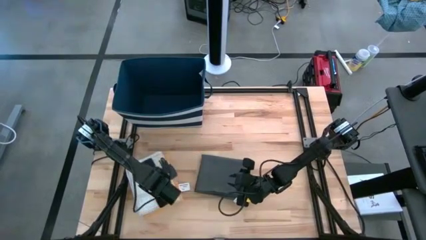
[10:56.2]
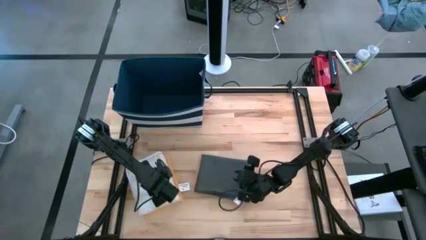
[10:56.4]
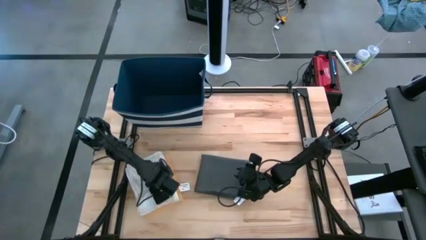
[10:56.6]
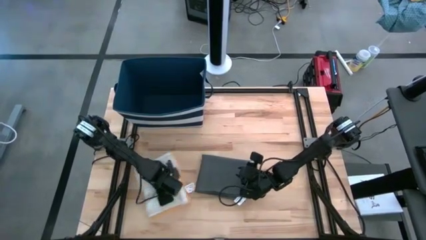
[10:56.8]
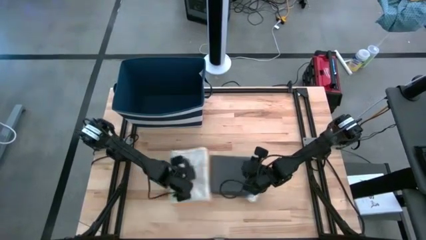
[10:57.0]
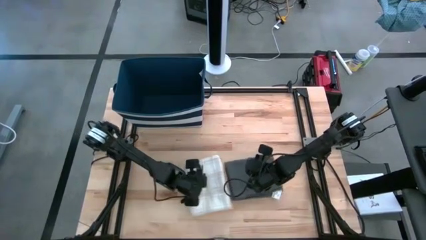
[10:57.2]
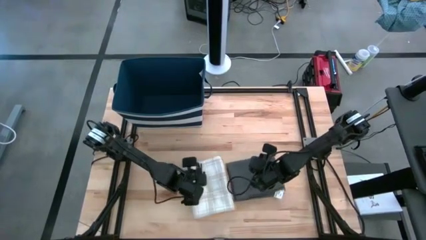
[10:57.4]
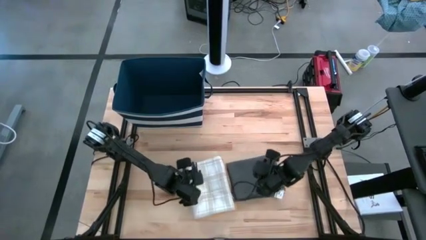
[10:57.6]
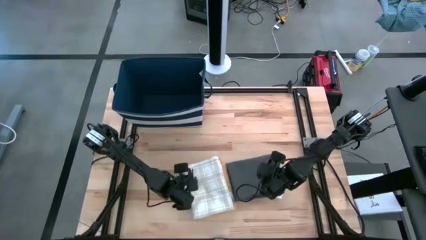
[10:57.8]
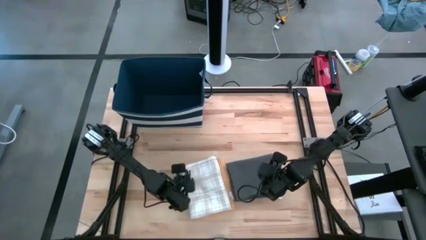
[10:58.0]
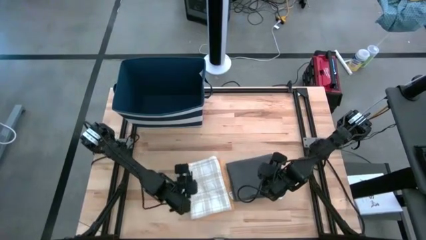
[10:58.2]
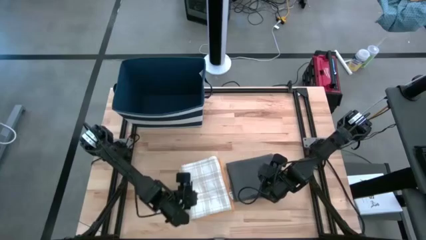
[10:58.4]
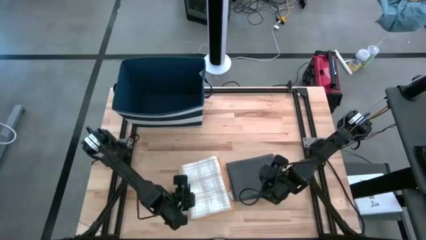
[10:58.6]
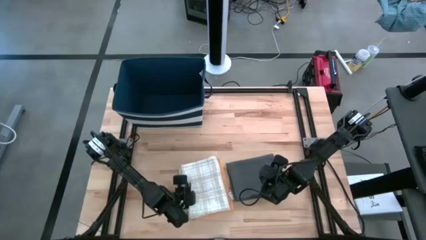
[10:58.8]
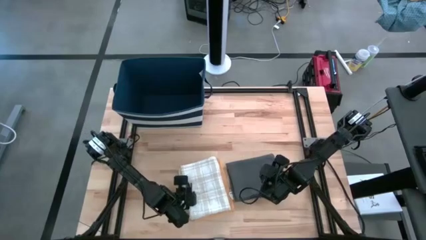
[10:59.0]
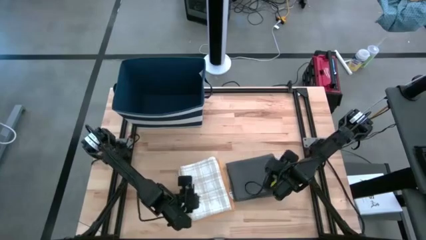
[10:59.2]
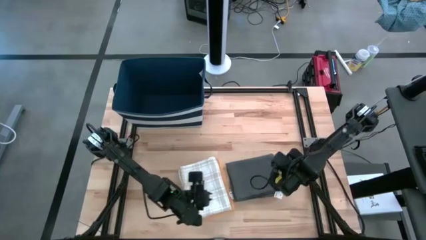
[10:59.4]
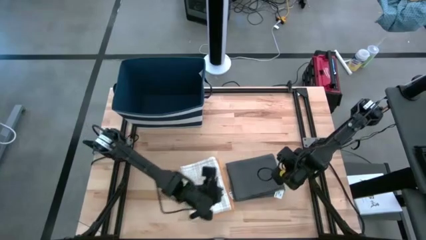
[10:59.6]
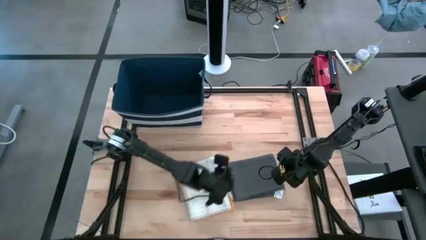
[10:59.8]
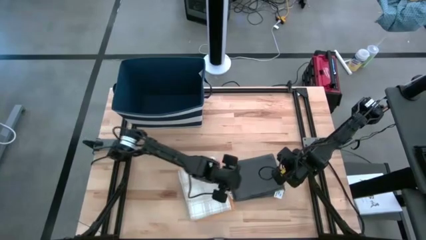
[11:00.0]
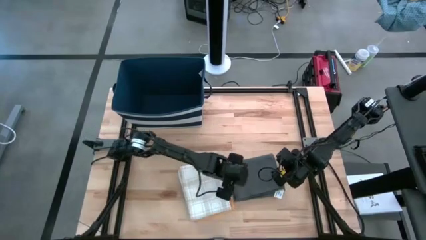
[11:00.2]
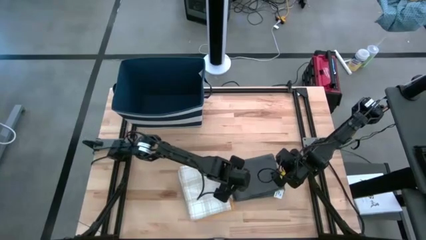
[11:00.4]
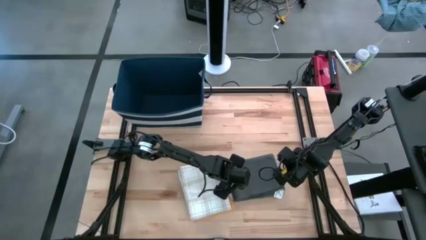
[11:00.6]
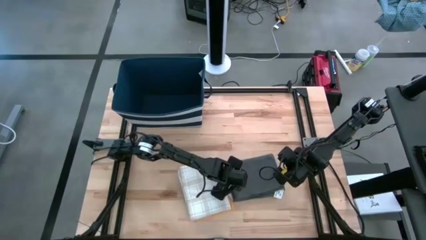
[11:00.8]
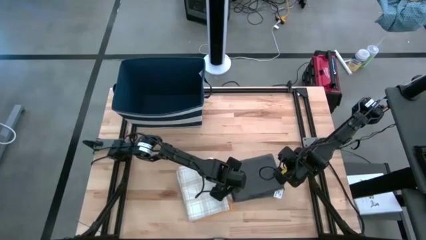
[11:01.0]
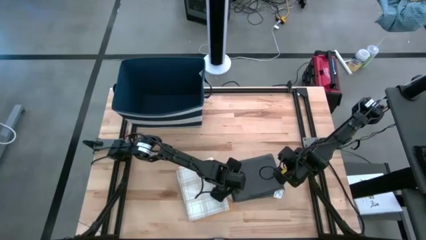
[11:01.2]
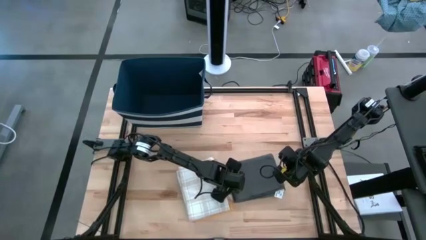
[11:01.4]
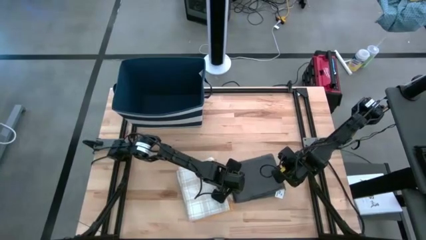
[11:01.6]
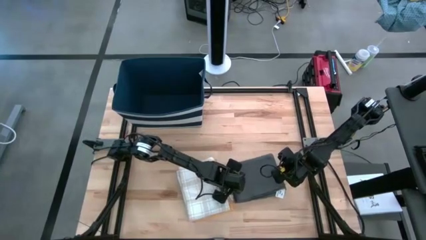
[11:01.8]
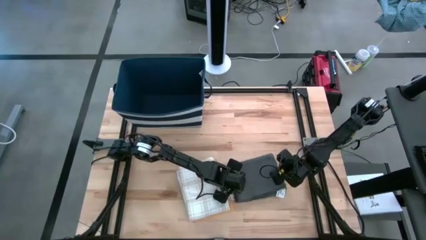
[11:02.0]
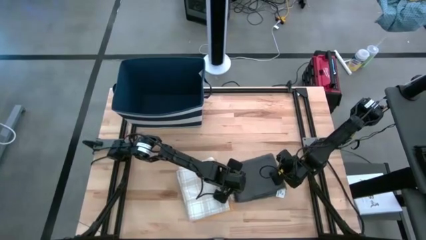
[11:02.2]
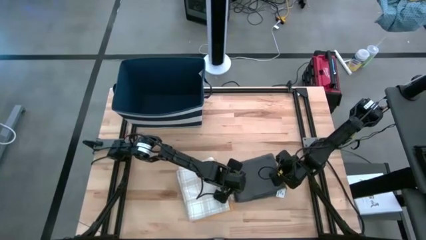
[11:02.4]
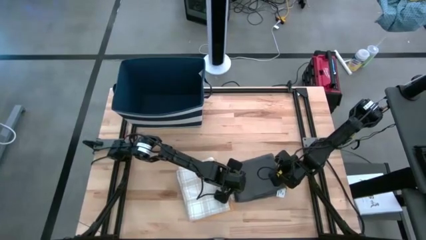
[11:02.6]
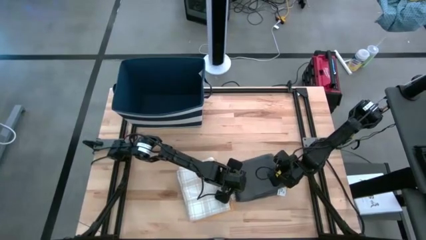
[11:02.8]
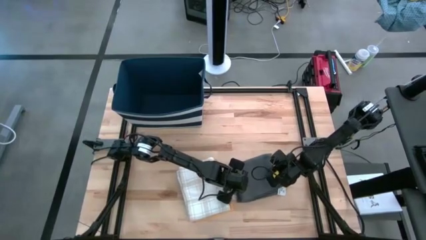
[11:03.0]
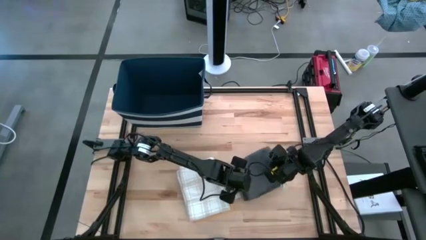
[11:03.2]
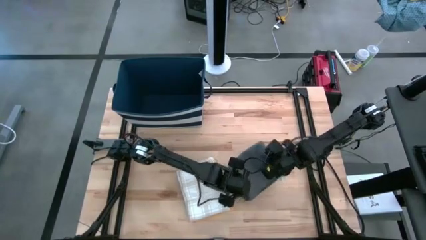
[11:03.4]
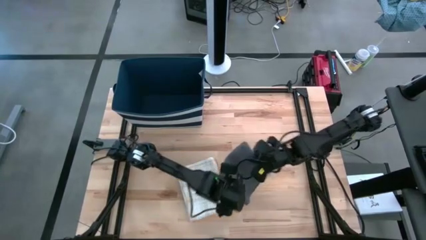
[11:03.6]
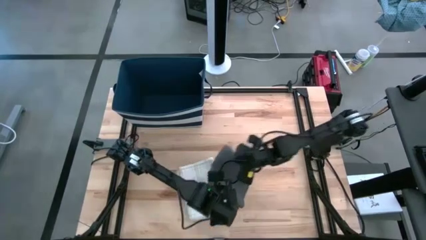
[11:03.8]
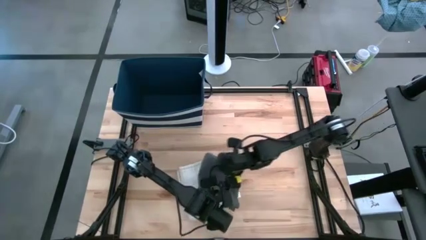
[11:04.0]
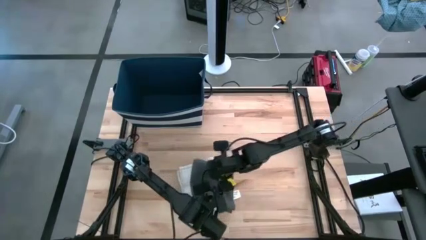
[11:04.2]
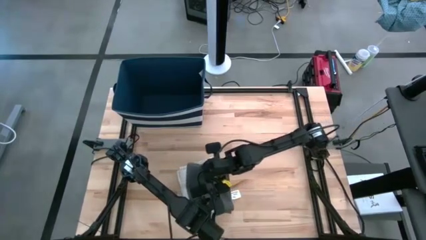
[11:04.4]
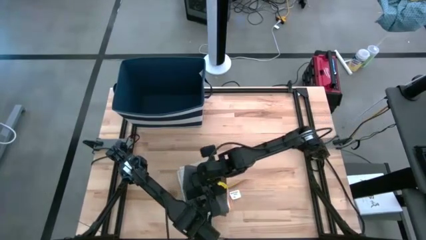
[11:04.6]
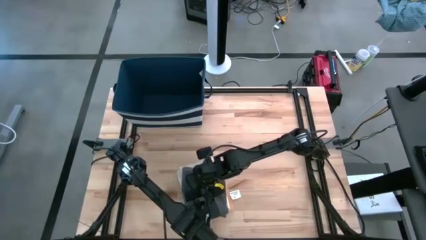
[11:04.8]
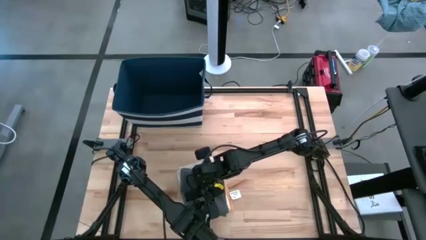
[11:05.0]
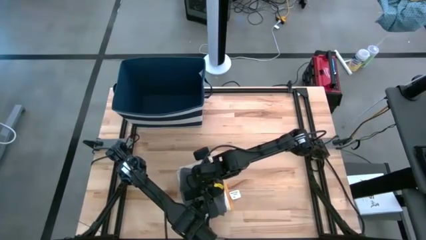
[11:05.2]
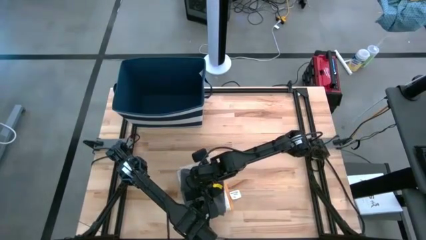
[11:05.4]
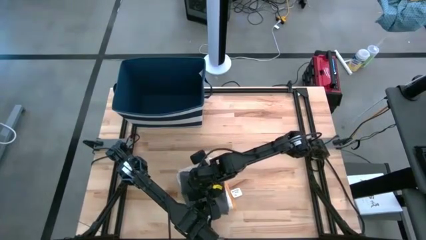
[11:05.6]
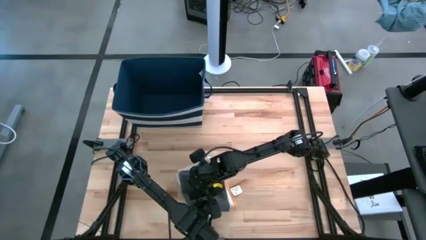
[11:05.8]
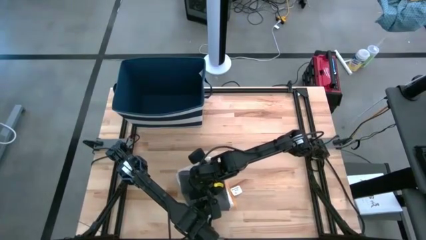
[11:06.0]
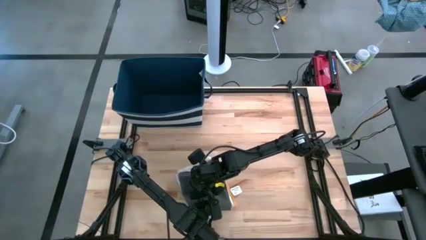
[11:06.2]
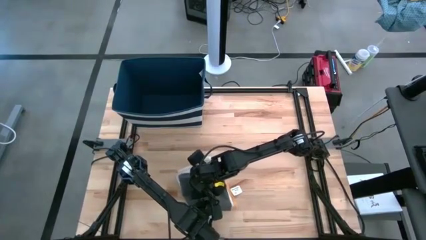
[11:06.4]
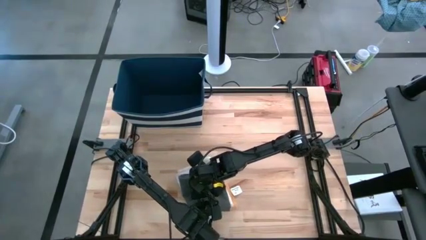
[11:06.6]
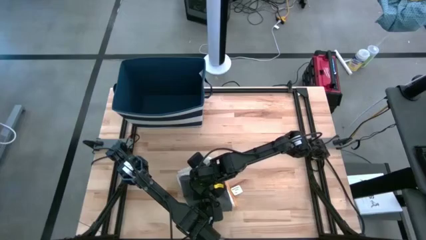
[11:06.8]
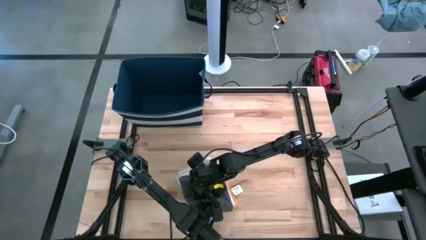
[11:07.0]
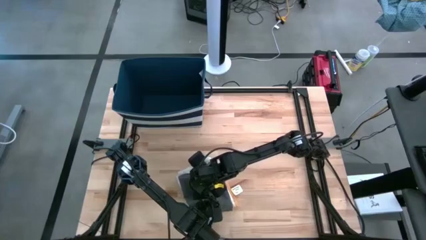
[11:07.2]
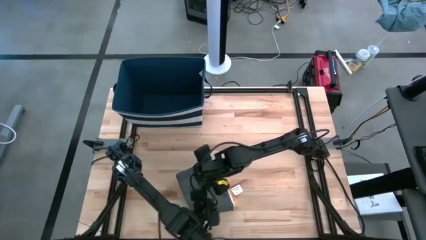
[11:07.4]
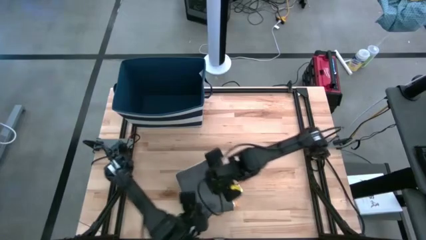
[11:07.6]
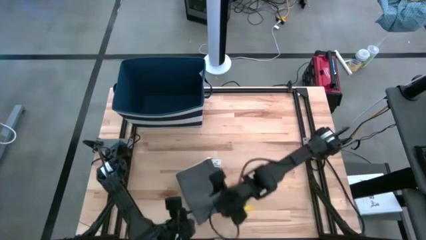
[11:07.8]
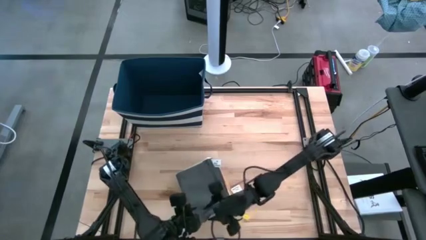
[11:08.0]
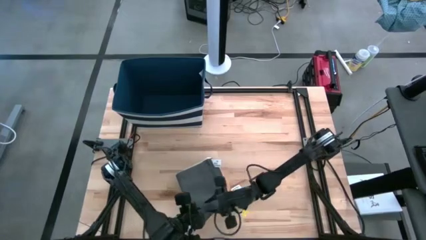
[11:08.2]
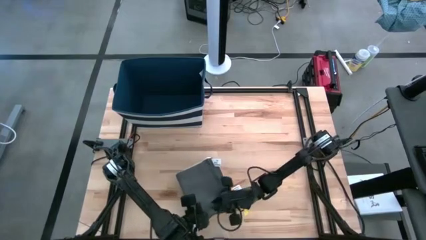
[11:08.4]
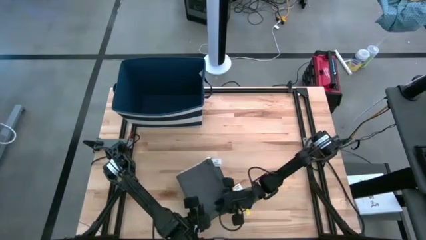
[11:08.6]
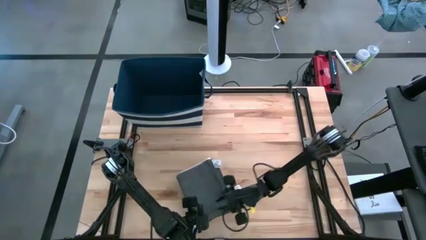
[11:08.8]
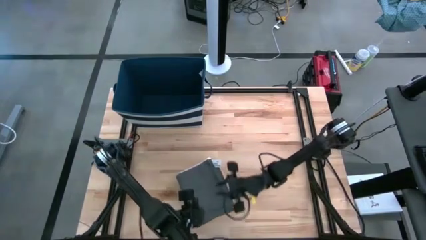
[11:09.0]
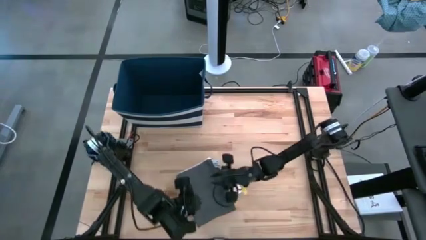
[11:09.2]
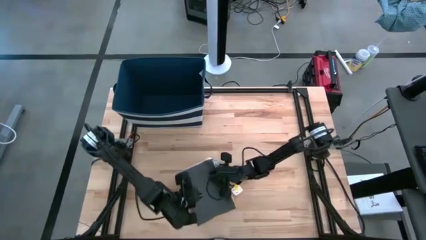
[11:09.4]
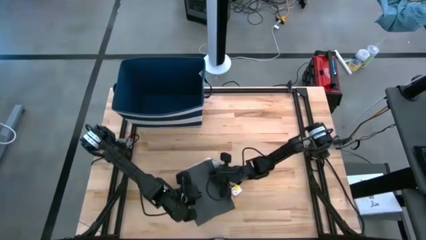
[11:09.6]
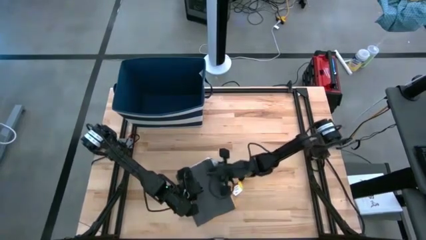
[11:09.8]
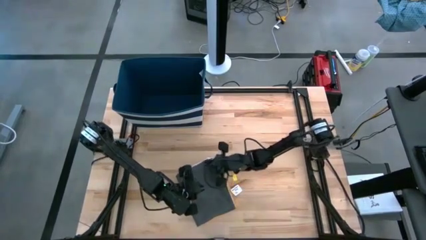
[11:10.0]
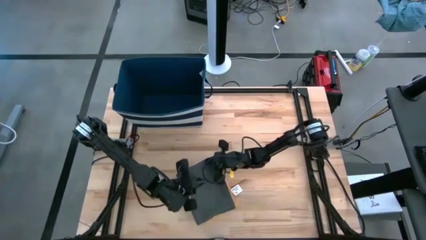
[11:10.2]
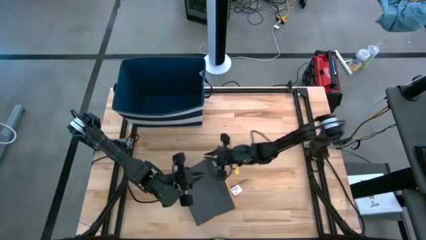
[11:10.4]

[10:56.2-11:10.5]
Task: Fold towel
Stack the gray kitchen towel on top of the white patterned kitchen towel

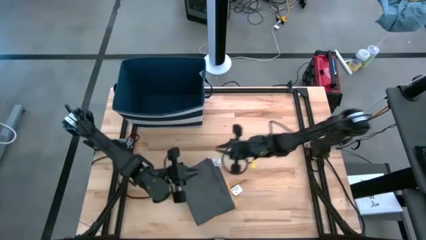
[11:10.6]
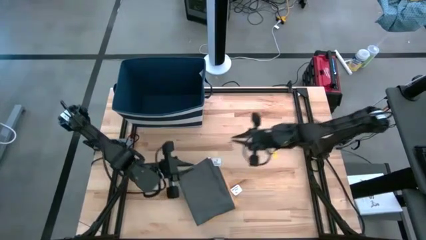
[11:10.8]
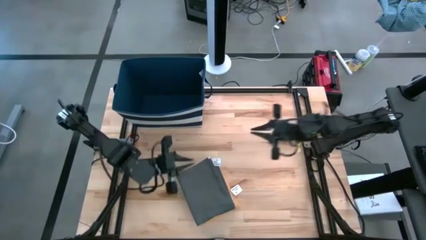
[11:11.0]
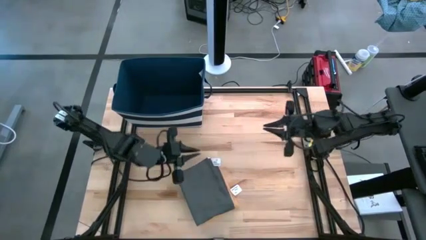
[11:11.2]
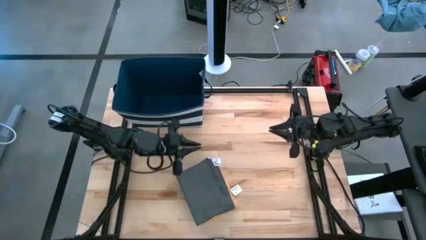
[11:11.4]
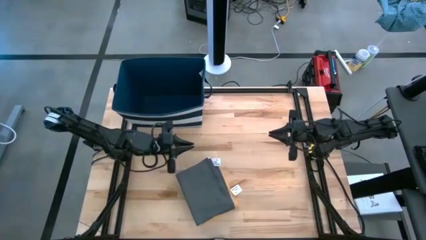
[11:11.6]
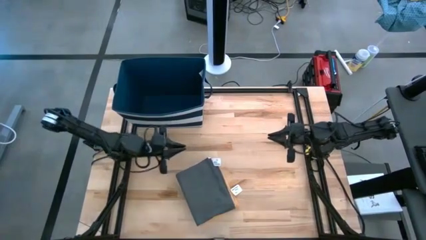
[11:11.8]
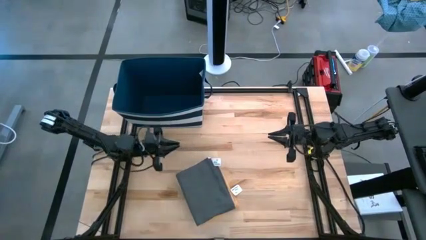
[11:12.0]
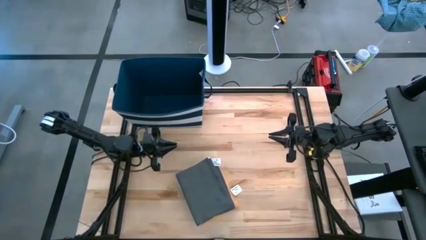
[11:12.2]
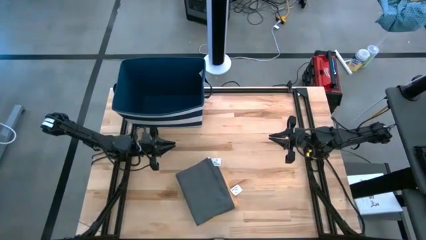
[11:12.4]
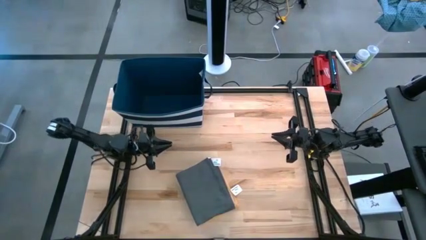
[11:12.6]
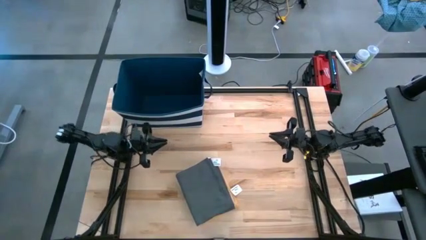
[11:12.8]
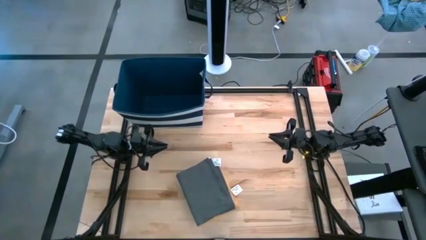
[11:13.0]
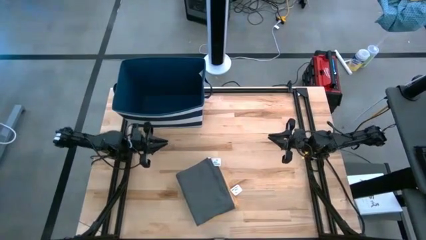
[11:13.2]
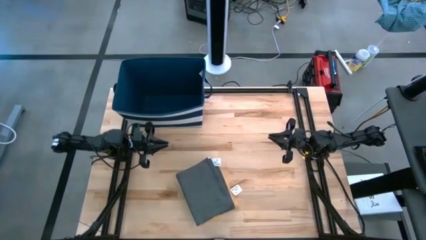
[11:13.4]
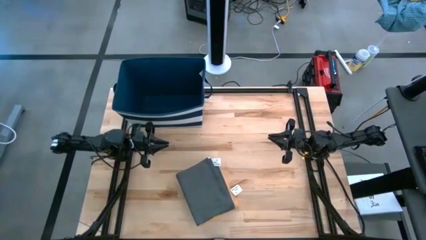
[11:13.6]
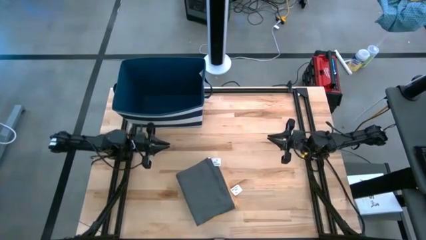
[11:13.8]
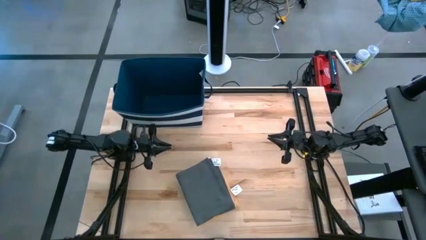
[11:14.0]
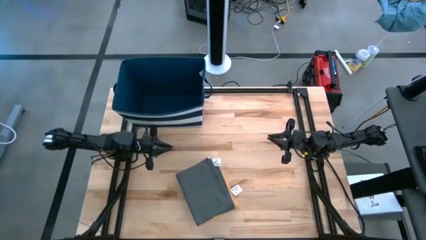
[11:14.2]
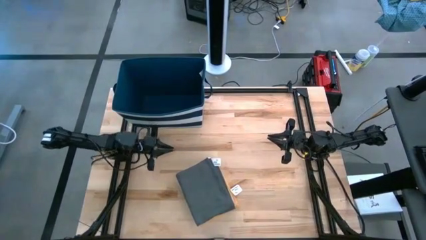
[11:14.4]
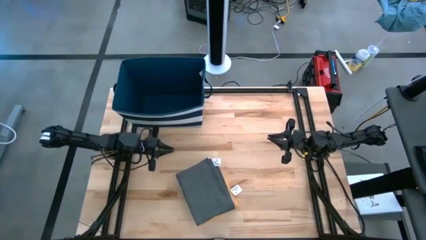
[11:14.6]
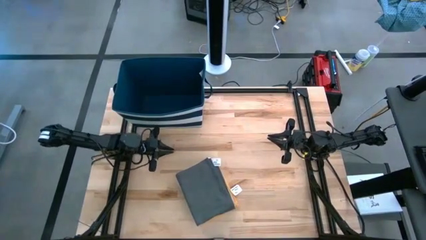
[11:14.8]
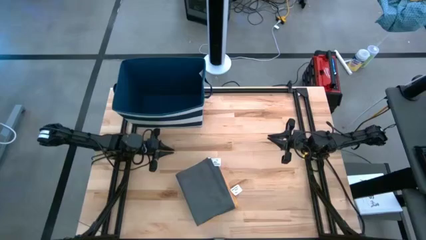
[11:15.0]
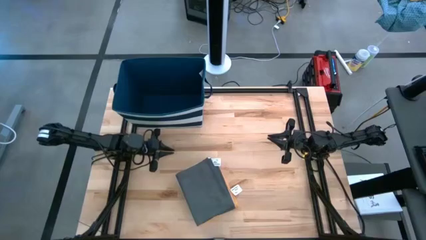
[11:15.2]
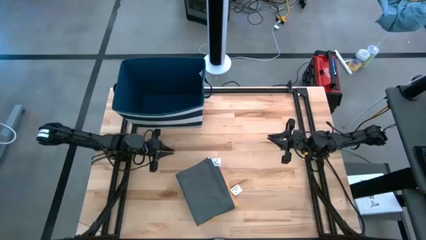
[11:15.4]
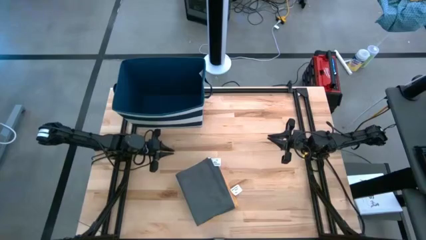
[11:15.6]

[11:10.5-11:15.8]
Return to Home Position
